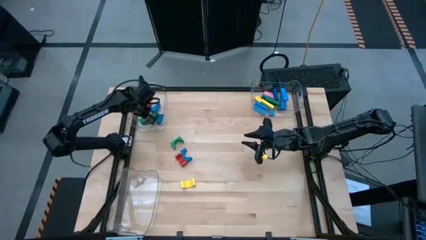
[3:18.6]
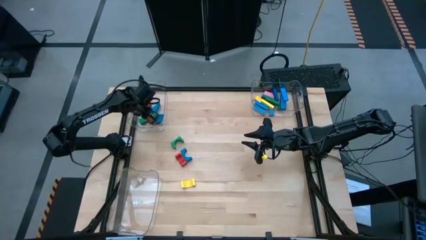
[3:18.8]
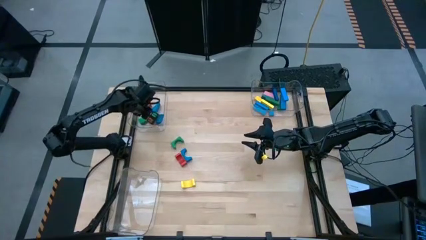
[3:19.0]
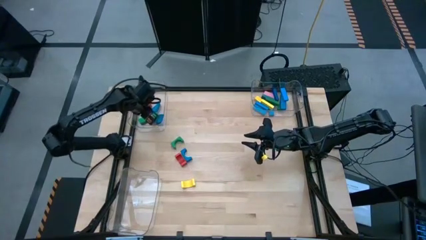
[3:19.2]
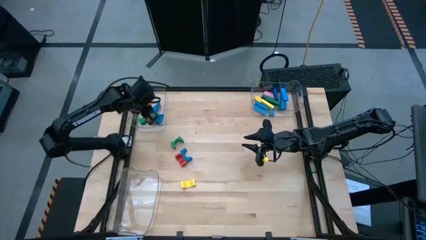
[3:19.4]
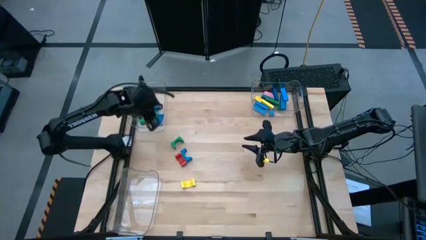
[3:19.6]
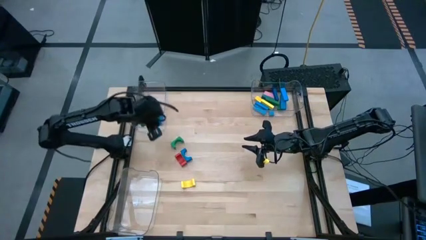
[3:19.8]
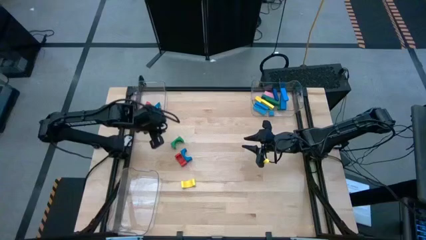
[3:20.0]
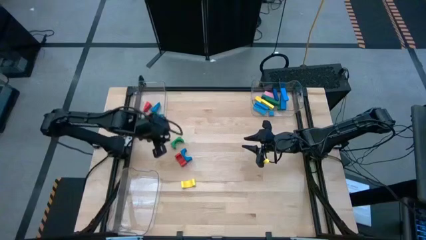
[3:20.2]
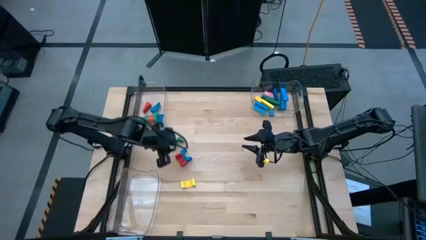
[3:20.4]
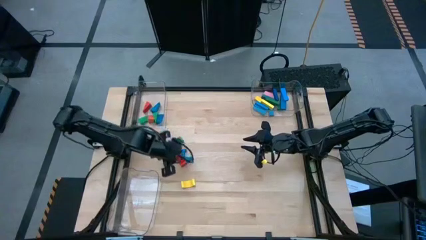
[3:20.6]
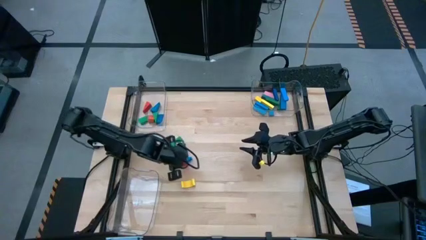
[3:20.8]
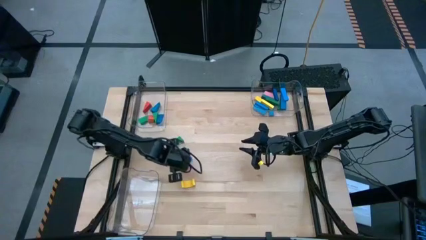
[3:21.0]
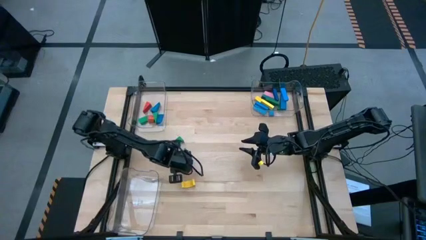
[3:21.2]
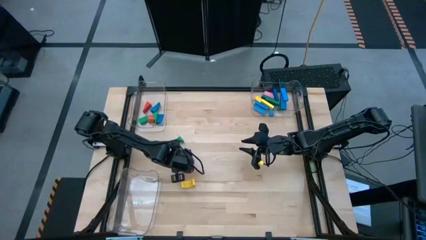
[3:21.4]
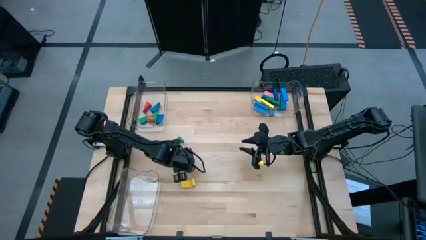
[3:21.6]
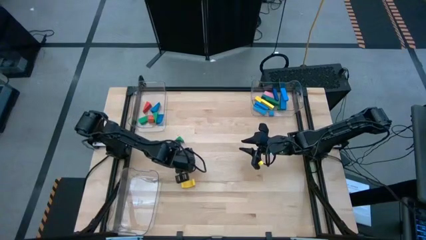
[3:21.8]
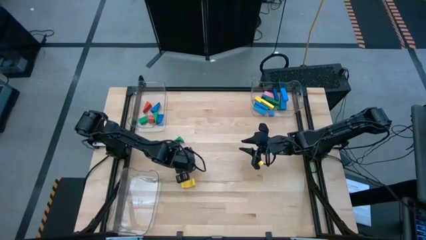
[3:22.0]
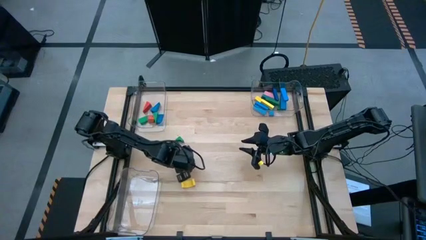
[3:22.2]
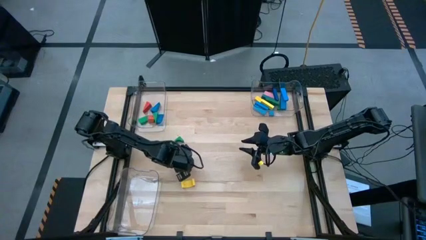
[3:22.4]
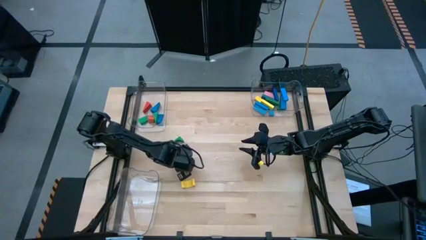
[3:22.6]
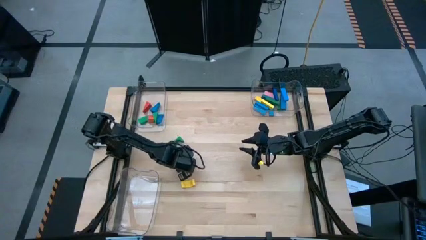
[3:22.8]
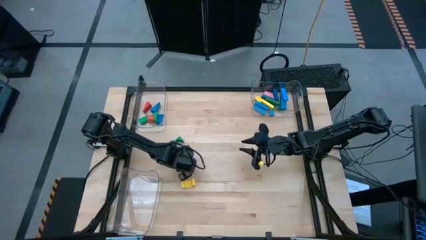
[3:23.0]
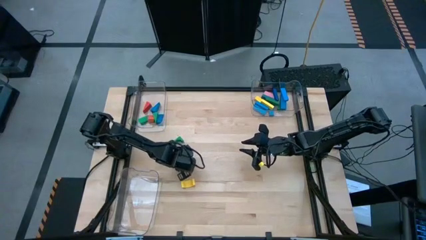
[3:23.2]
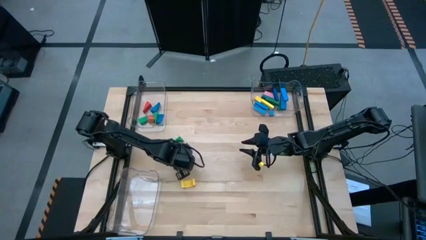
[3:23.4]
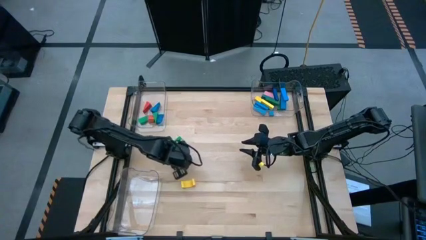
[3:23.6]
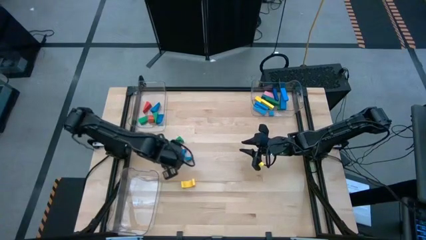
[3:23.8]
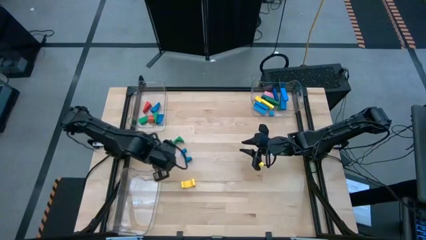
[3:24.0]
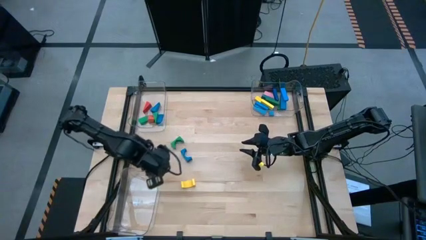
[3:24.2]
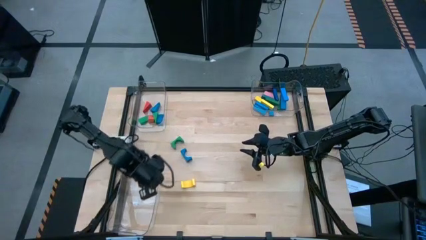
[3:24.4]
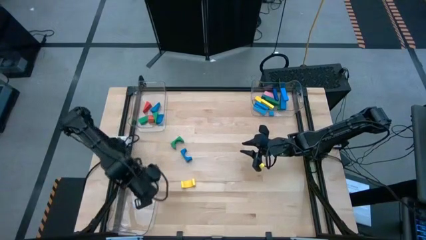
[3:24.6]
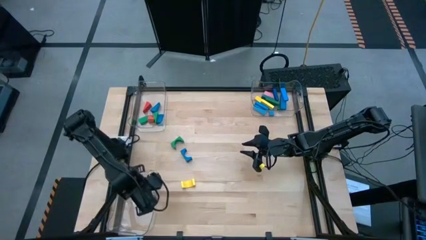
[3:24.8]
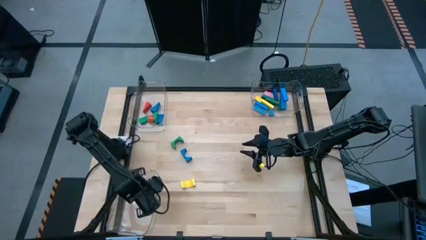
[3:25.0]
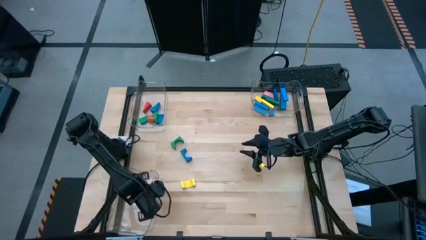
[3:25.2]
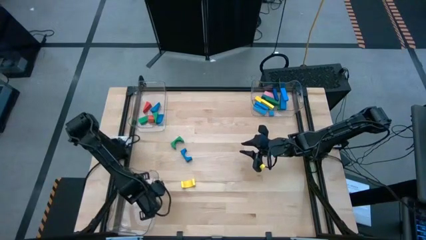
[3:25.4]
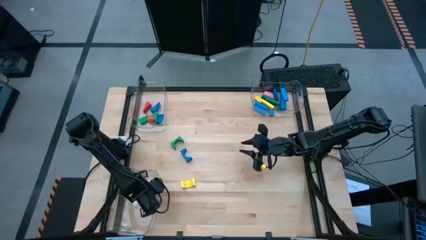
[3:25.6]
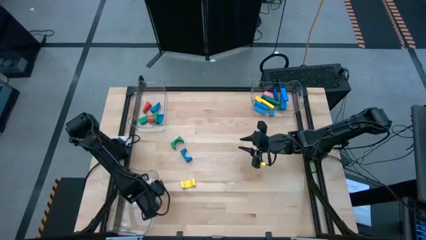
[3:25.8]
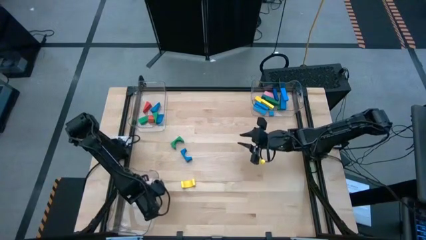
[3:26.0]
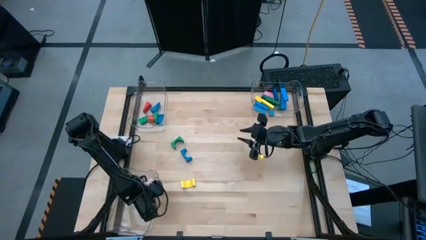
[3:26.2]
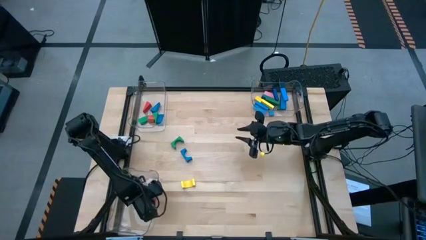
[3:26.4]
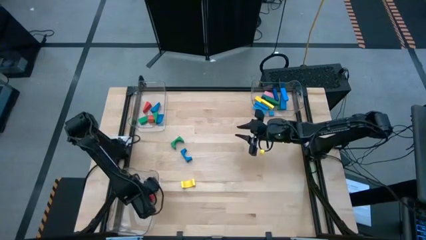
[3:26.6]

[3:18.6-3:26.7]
Task: Sort blocks by size
Put the orange arch block into the bottom left transparent bin

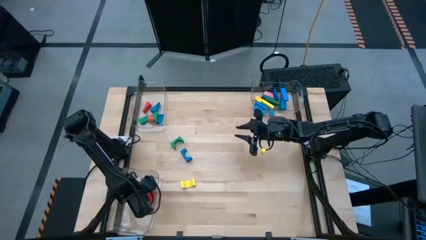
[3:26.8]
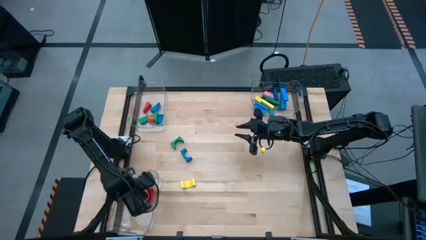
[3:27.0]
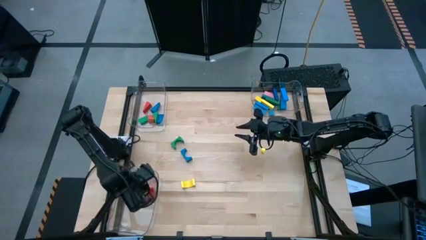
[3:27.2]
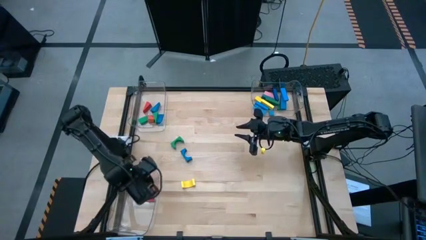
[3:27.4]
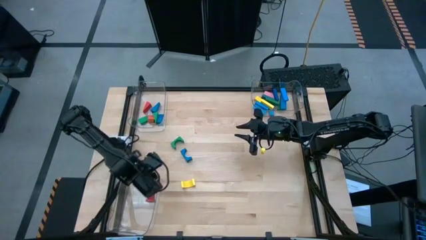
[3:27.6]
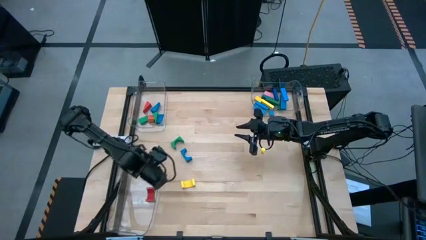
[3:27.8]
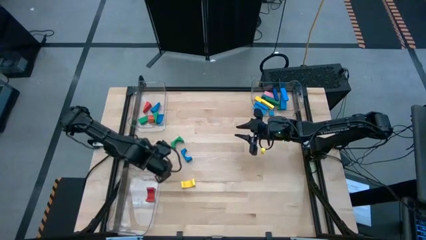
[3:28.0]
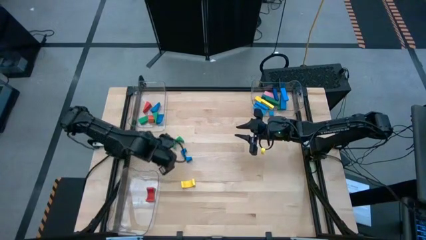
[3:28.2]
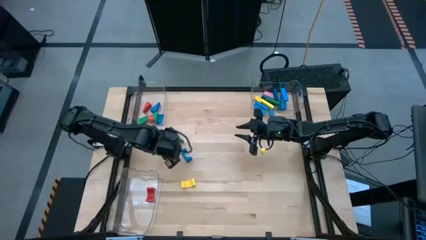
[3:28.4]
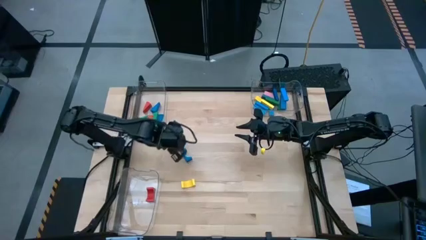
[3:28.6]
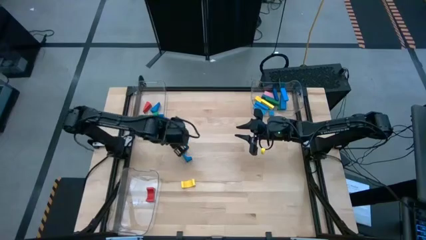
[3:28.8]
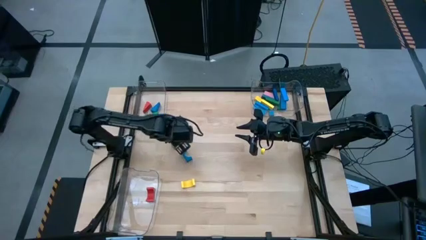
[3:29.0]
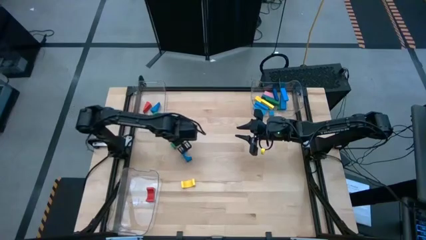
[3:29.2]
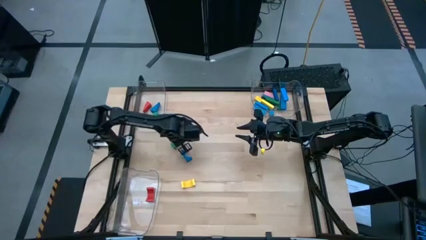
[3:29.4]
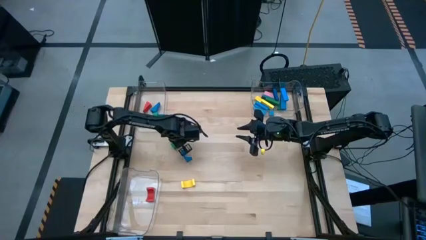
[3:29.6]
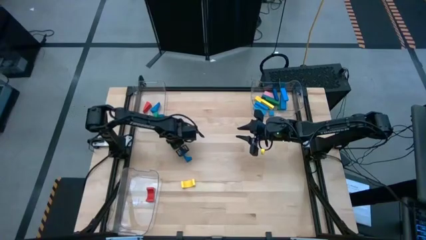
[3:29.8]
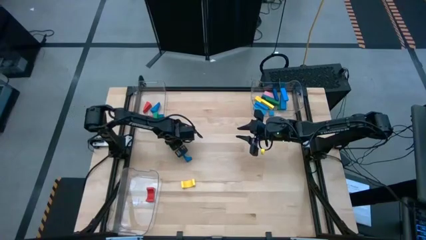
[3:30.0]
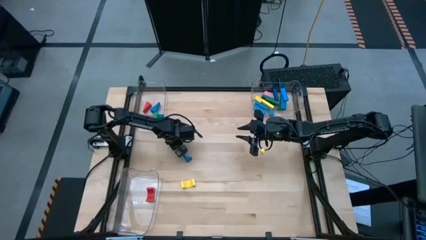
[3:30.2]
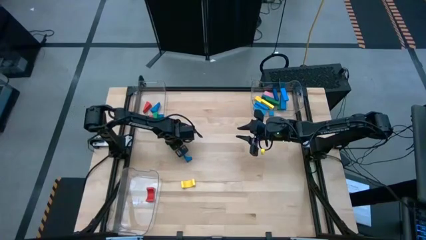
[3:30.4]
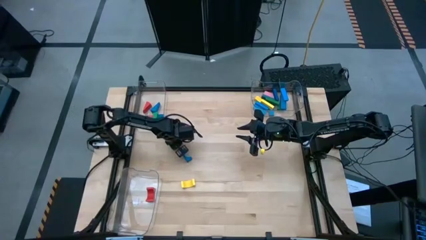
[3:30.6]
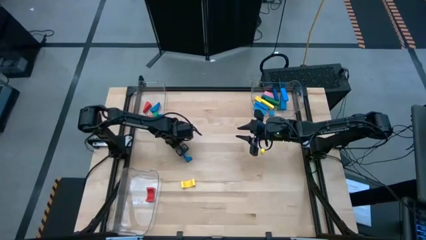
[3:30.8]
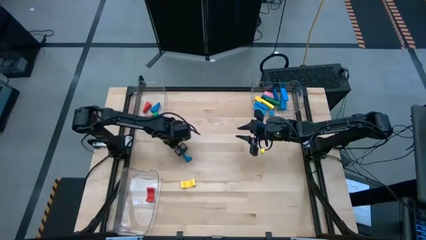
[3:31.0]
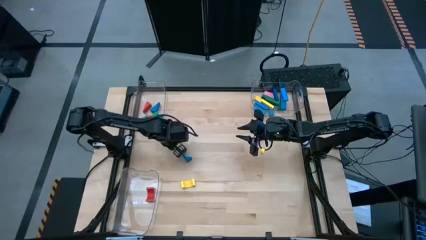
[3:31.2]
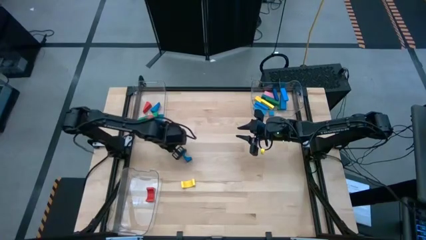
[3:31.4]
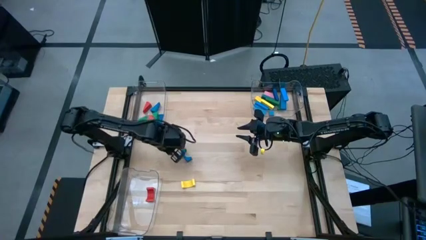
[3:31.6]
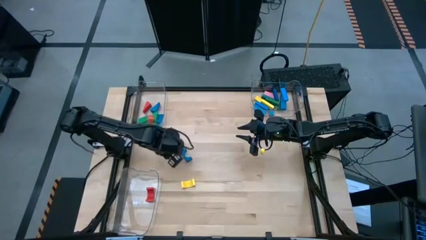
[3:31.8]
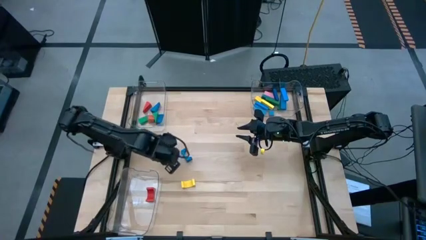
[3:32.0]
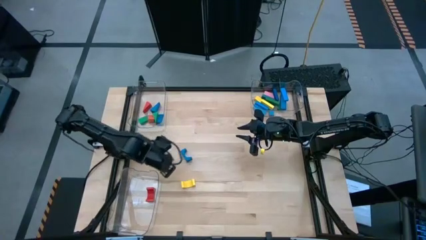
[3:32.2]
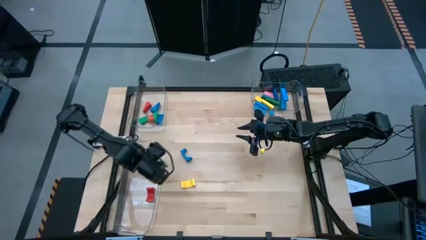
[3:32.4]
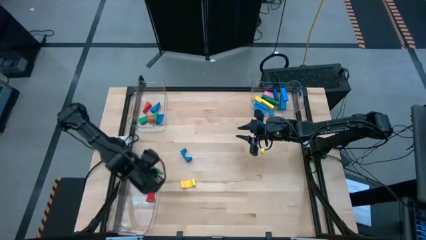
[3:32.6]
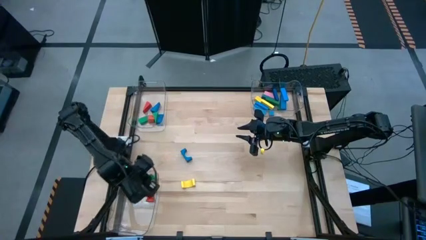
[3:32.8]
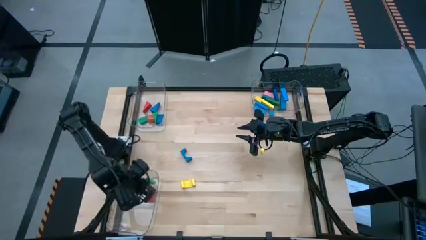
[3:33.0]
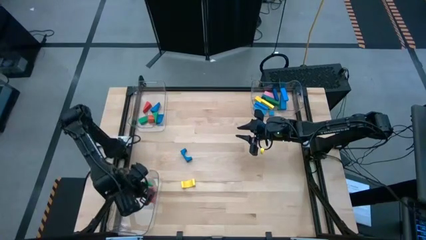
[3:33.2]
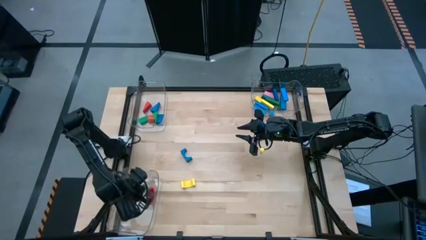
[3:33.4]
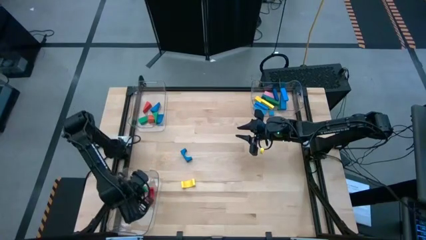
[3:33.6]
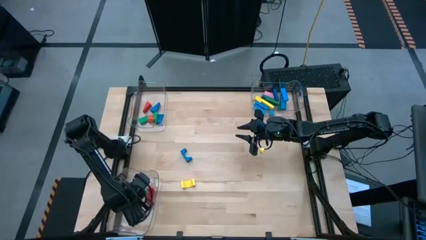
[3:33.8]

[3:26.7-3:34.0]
Put the green arch block into the bottom left transparent bin
